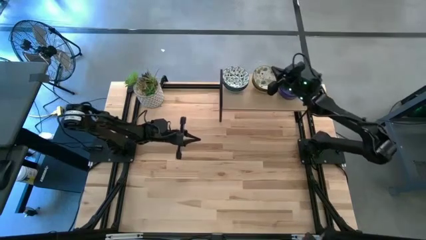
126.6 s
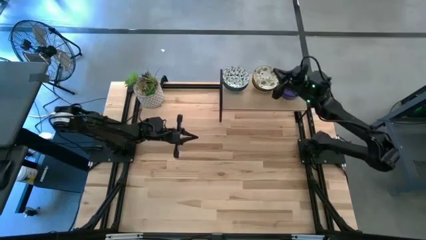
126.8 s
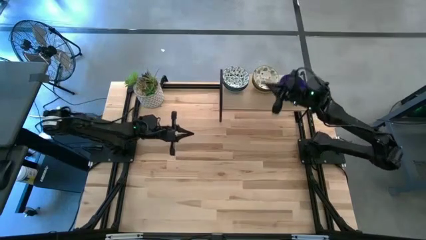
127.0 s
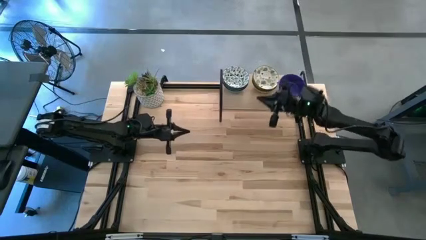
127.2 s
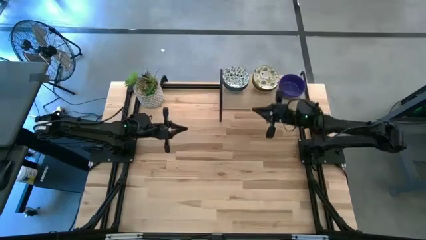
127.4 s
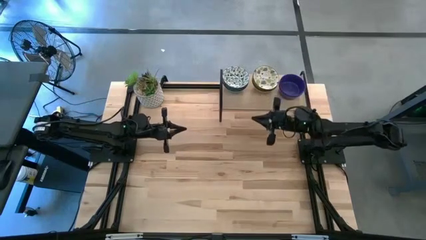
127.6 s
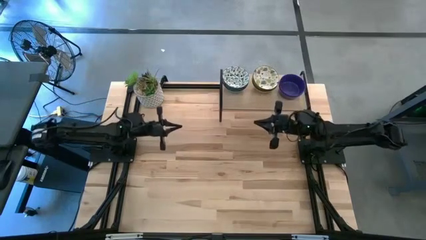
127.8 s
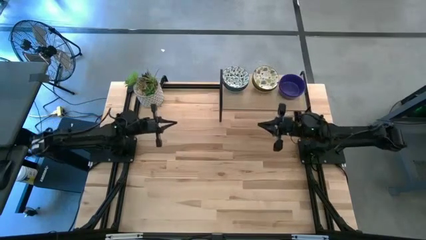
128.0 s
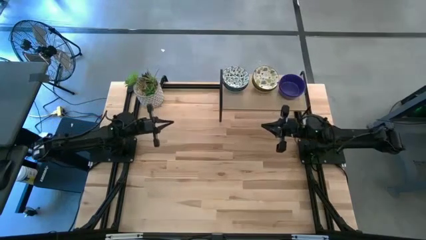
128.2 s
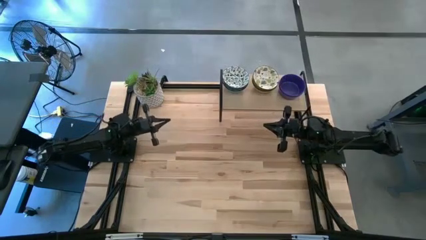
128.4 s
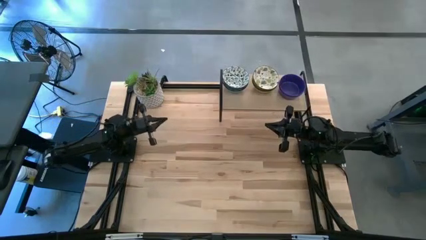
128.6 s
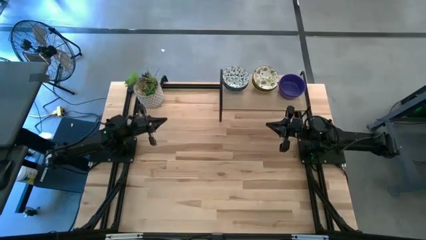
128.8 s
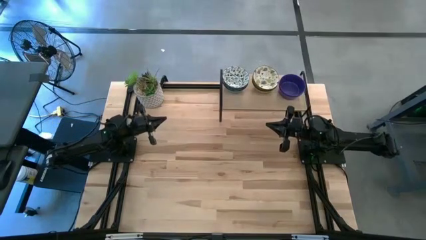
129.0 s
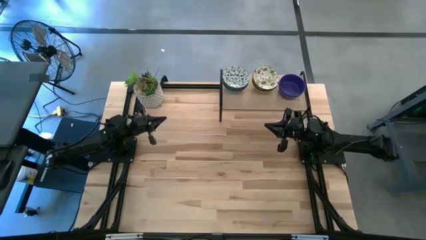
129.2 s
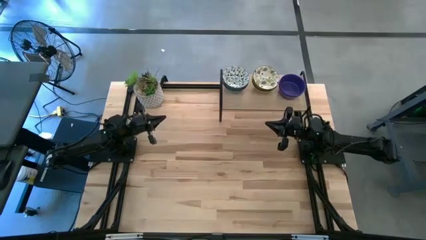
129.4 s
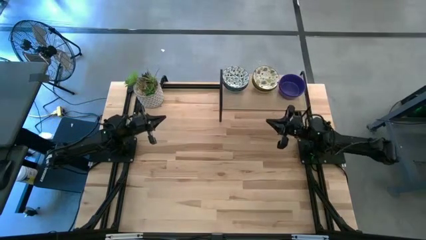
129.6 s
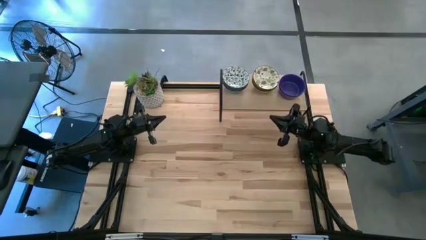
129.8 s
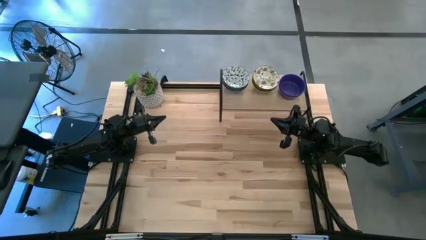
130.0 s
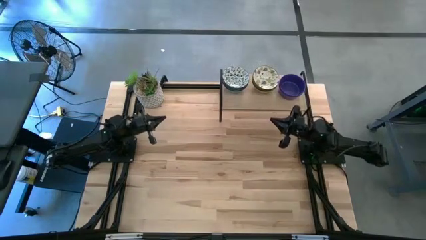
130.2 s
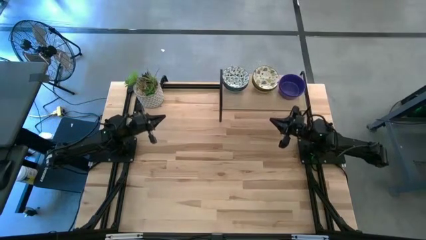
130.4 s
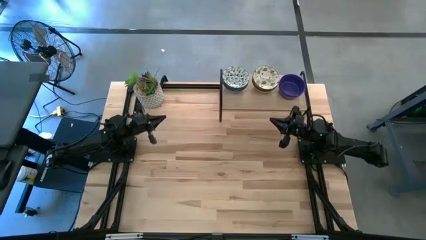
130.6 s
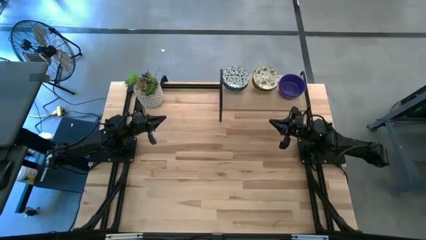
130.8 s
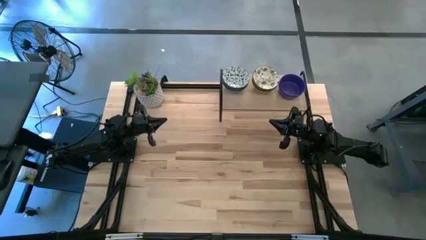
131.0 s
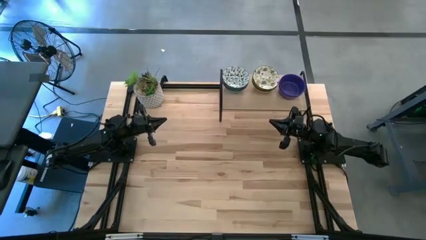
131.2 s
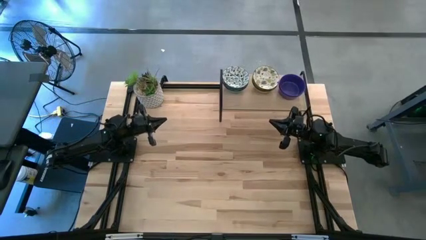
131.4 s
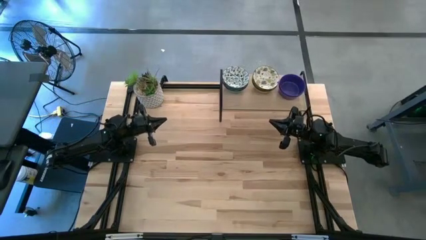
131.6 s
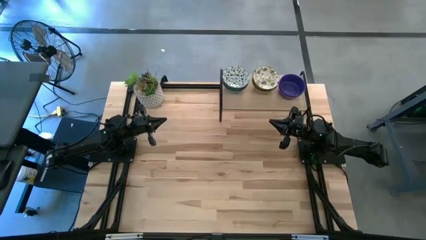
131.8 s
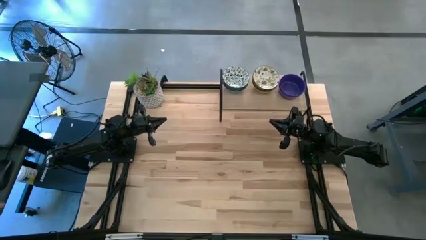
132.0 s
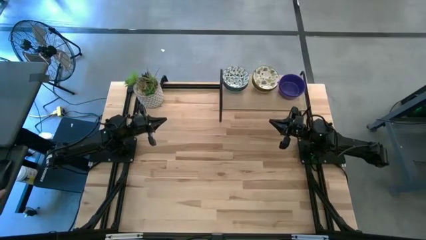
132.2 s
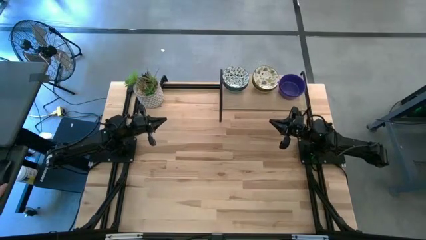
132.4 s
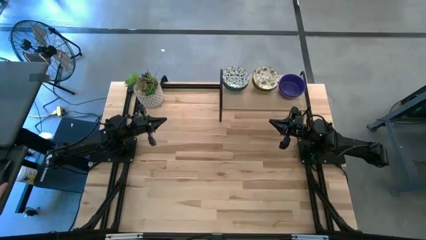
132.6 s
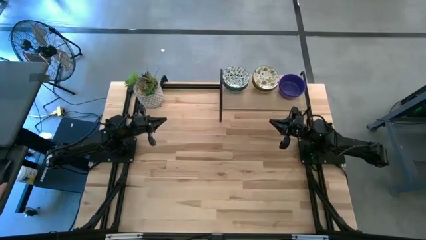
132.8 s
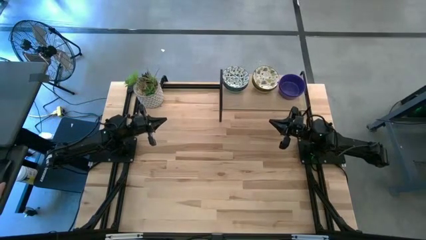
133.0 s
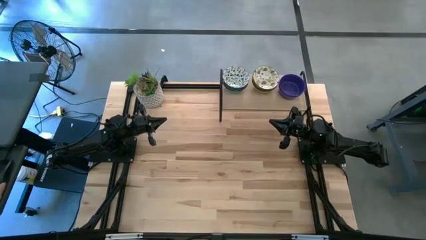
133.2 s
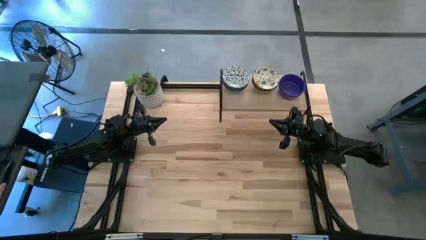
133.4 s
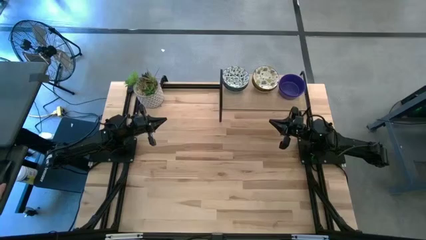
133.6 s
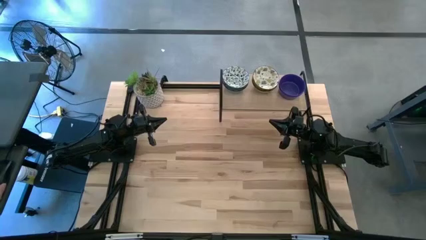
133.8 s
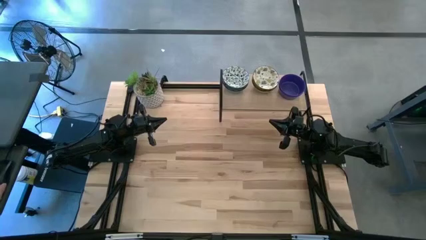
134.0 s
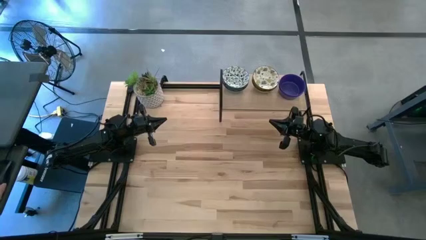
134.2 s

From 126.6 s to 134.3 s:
Task: Pick & Place Mini bowls
Return to Home Position

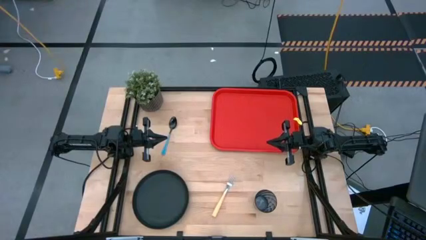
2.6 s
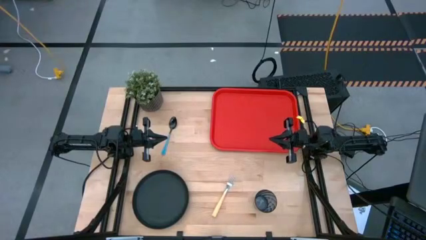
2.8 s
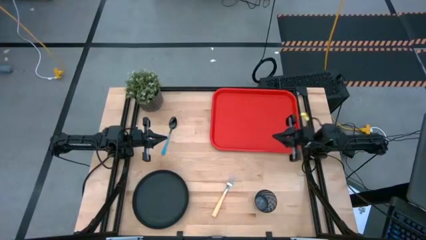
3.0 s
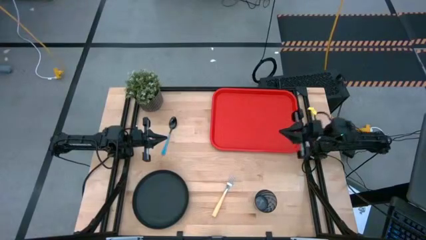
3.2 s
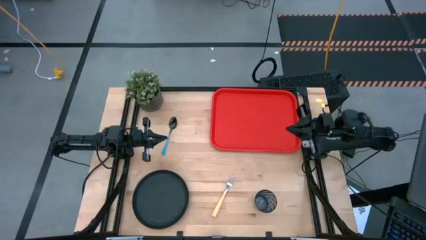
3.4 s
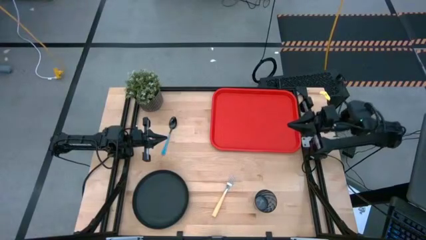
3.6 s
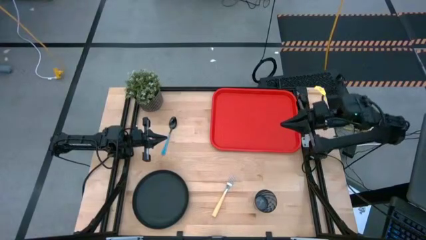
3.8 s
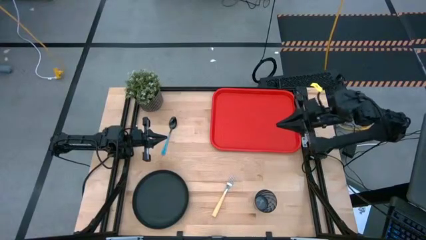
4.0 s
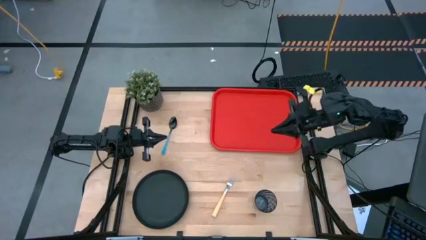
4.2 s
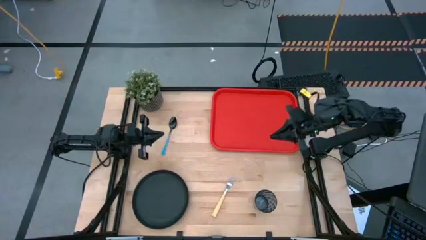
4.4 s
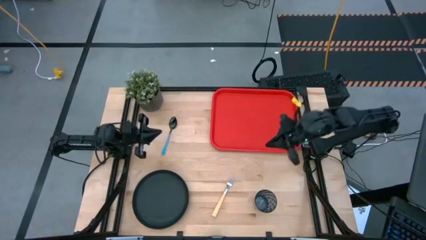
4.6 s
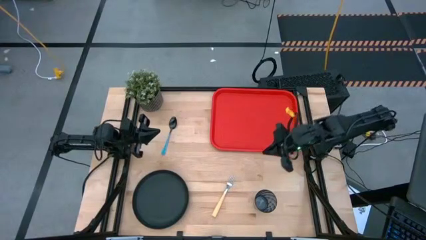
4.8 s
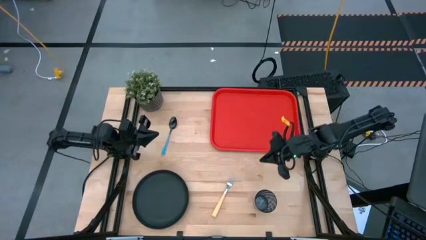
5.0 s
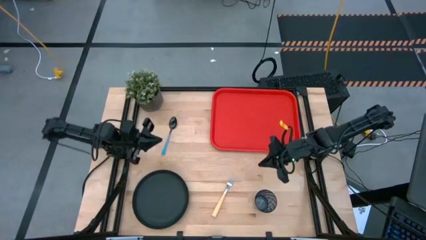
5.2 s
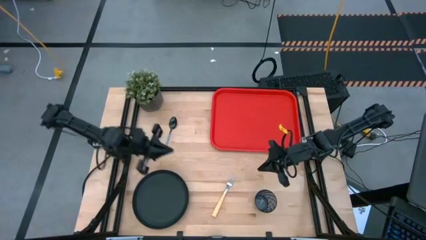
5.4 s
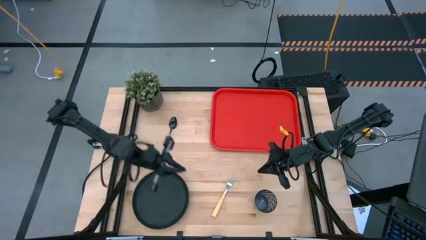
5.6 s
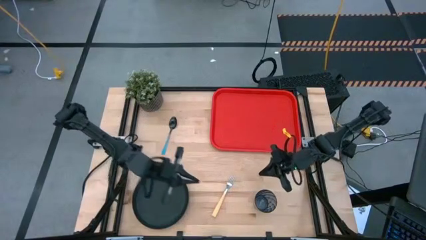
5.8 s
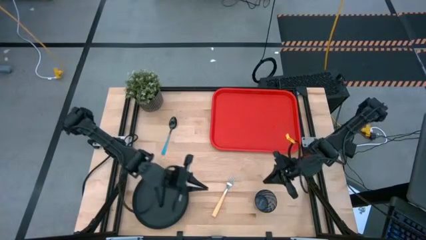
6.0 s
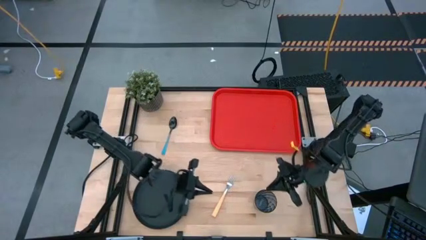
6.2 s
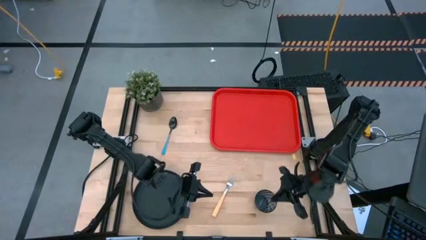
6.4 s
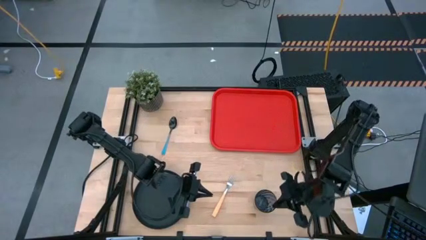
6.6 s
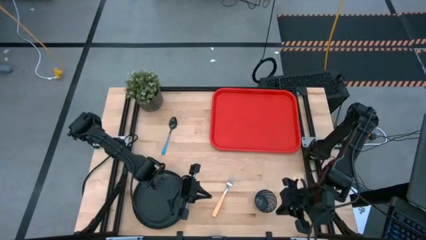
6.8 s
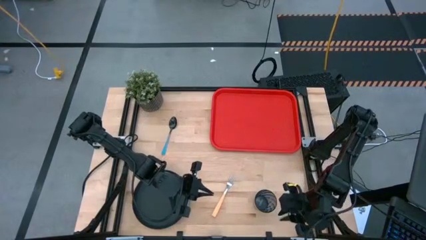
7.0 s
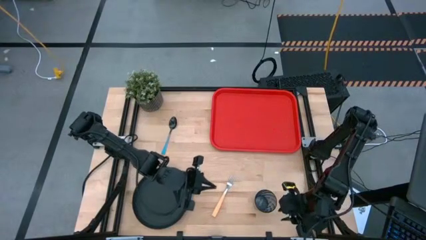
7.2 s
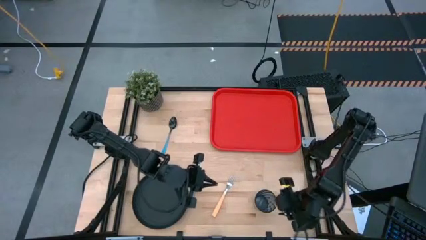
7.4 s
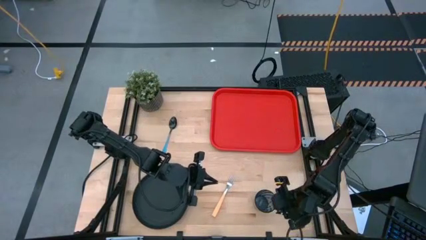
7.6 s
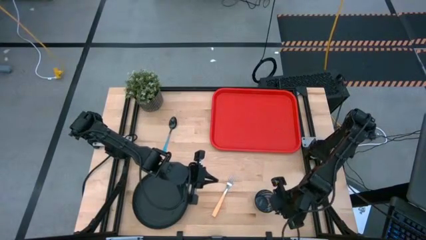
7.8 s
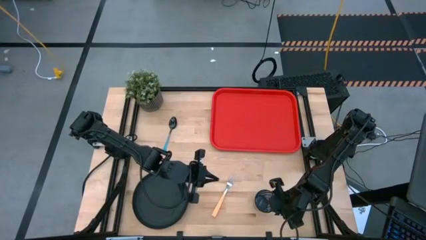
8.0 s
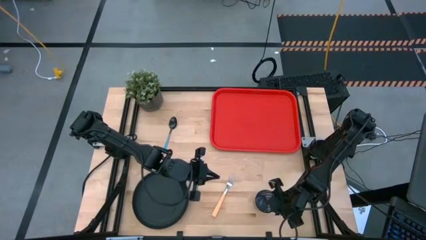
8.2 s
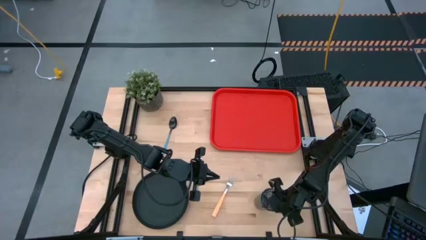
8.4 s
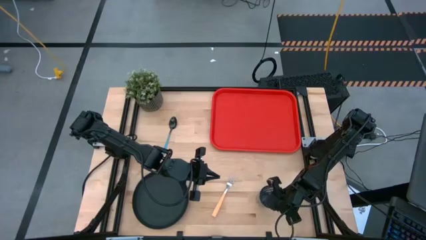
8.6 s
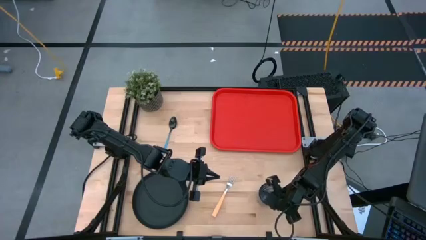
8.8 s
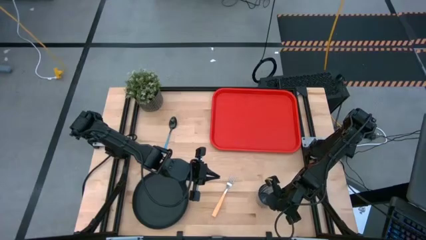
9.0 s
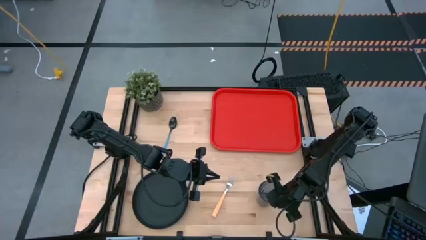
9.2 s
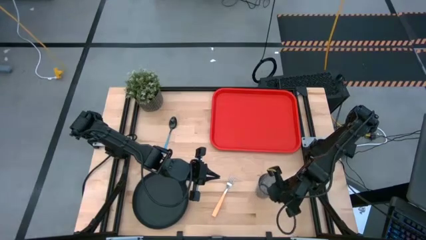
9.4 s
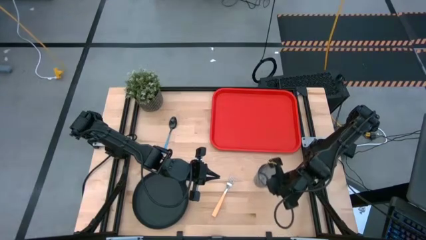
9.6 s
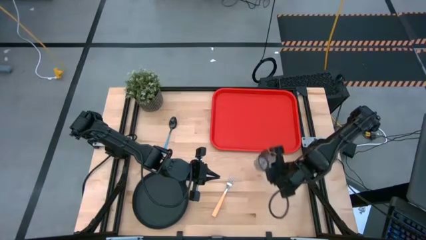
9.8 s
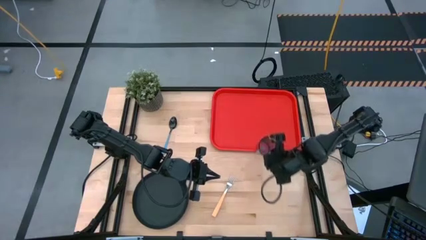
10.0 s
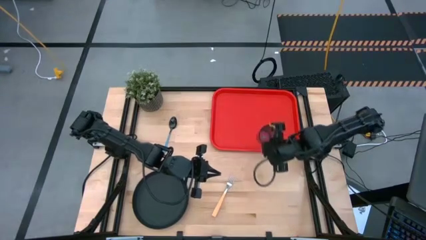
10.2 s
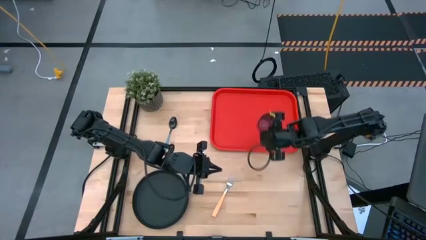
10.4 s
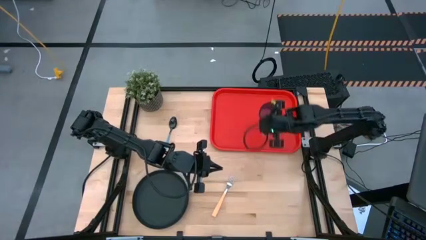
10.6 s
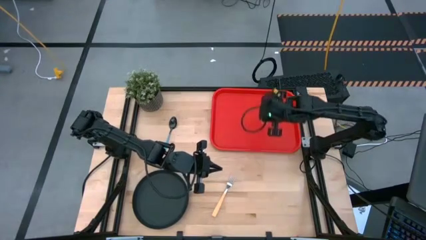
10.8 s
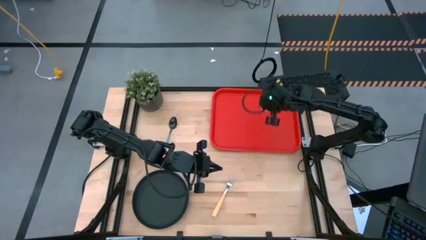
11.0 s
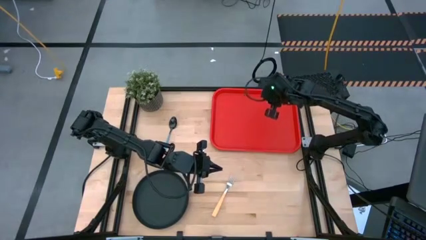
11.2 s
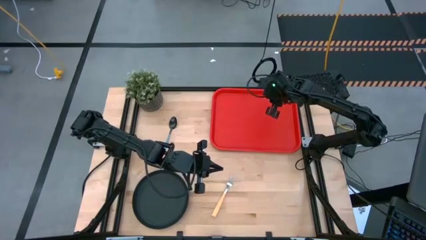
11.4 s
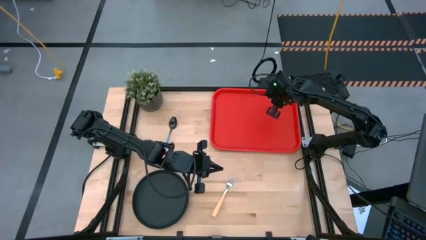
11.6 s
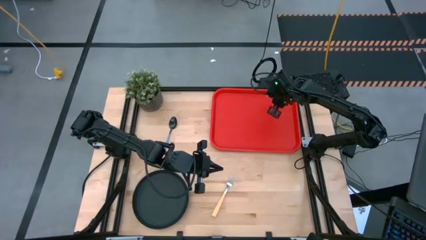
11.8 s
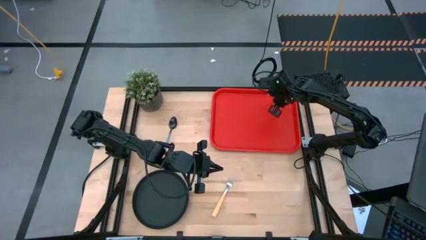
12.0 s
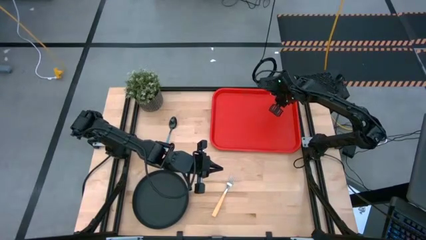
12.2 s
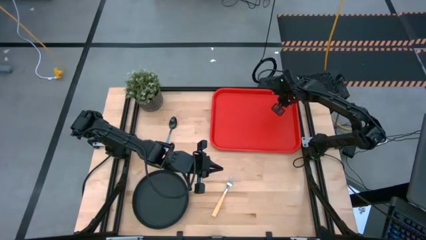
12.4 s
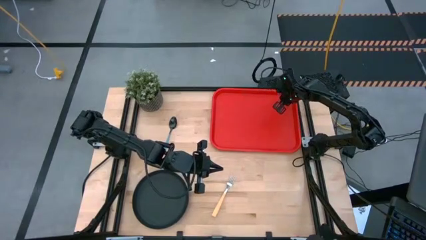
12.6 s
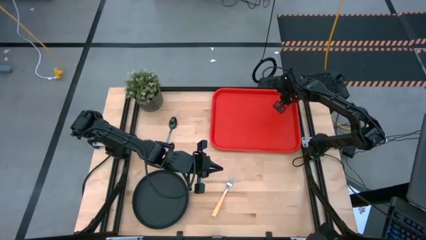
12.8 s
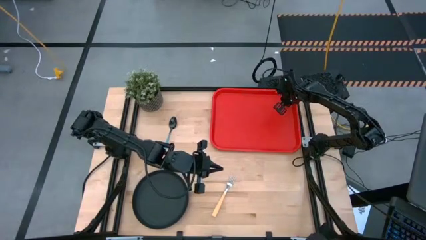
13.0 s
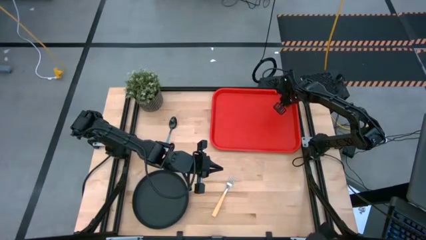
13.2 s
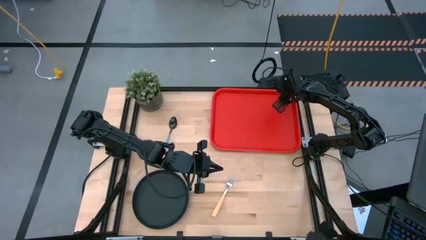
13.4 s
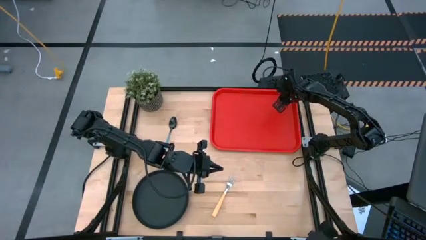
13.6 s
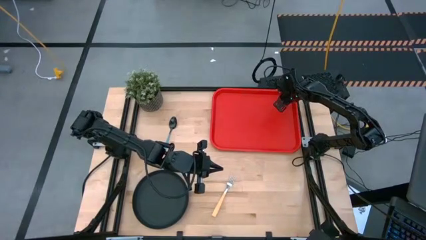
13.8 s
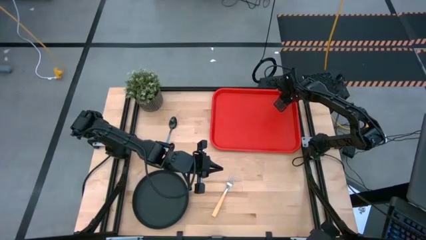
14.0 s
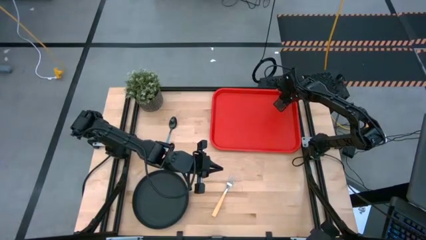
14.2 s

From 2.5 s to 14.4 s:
Task: Pick and place plate/cup/fork/spoon on tray
Put the black cup on the red tray
